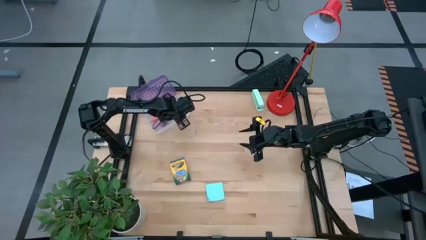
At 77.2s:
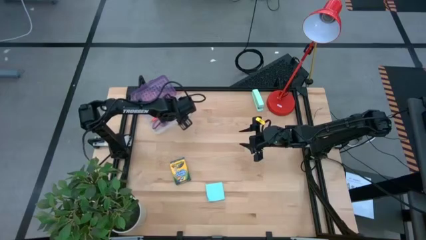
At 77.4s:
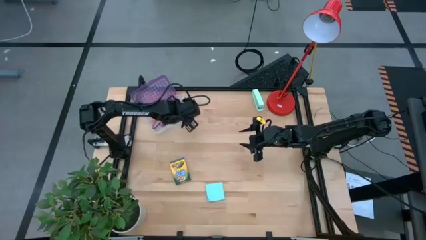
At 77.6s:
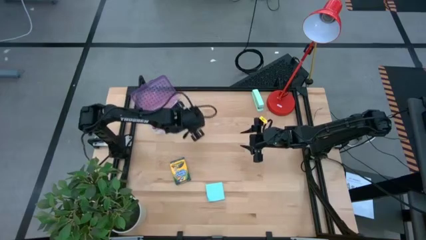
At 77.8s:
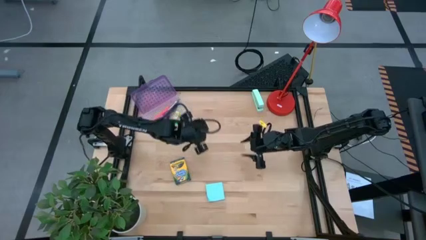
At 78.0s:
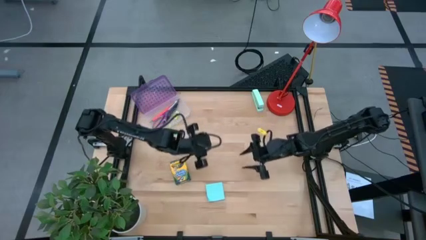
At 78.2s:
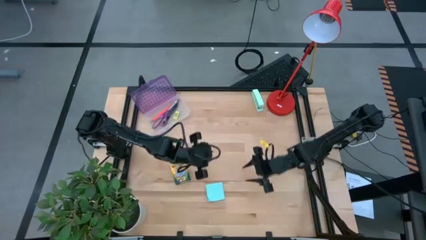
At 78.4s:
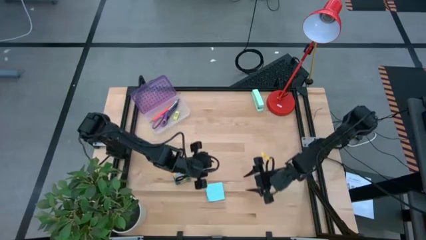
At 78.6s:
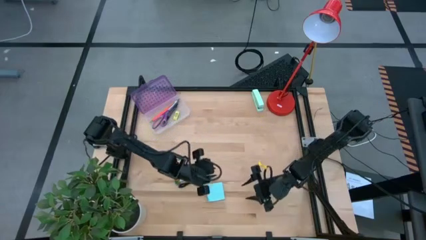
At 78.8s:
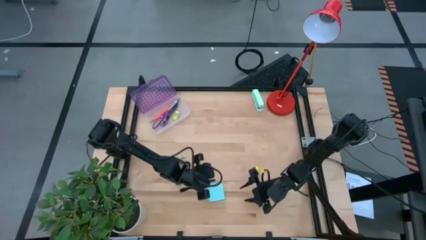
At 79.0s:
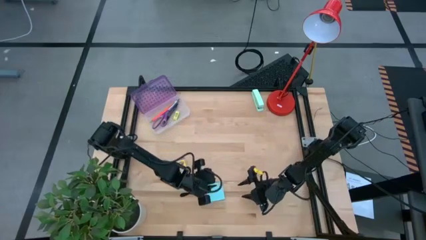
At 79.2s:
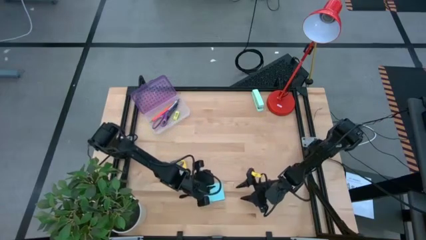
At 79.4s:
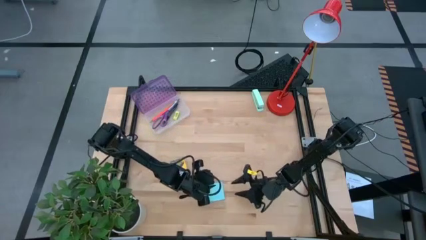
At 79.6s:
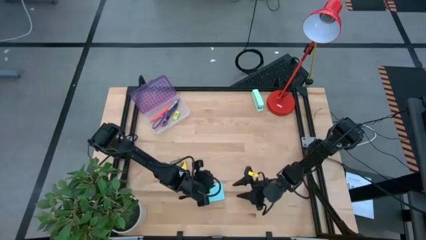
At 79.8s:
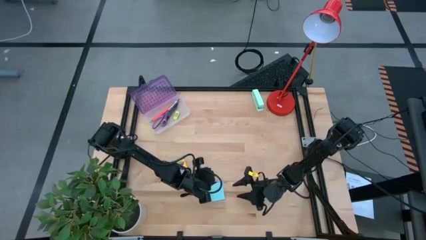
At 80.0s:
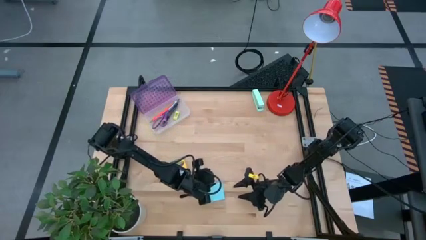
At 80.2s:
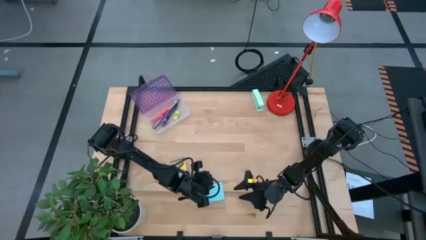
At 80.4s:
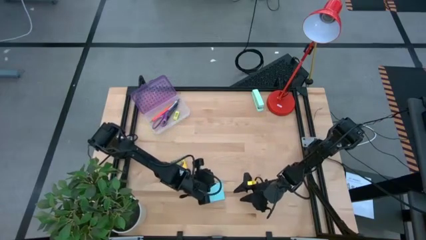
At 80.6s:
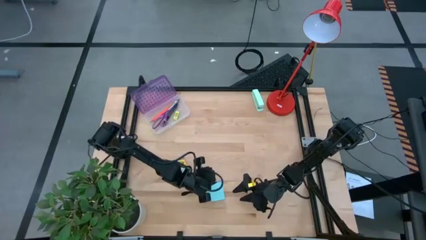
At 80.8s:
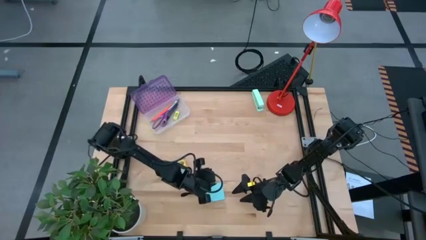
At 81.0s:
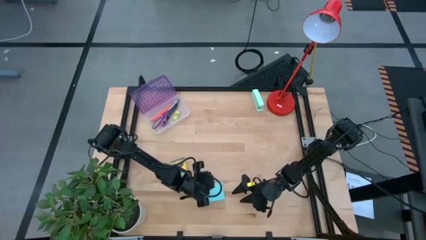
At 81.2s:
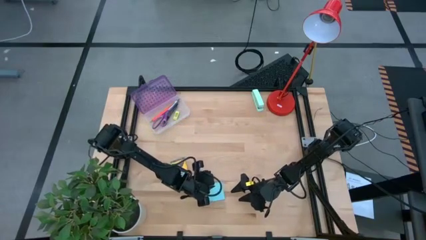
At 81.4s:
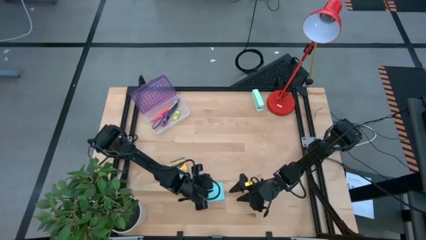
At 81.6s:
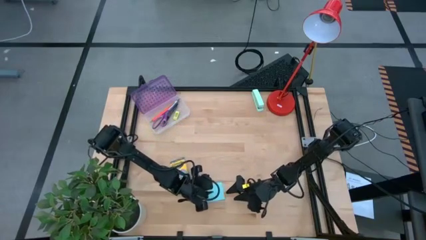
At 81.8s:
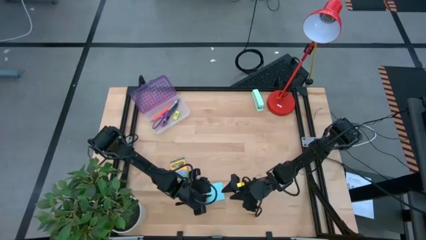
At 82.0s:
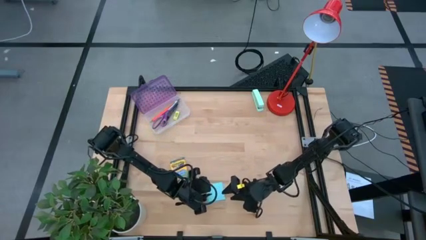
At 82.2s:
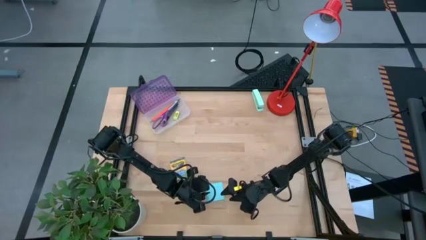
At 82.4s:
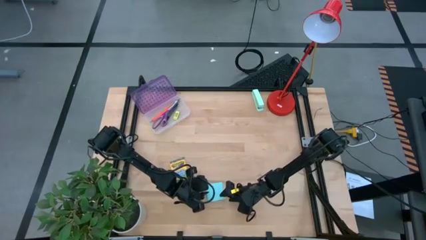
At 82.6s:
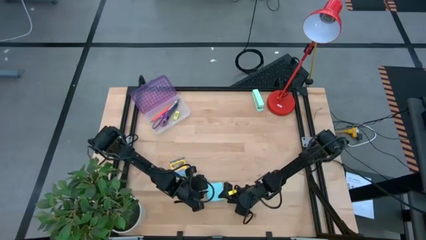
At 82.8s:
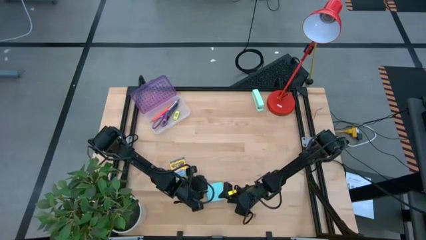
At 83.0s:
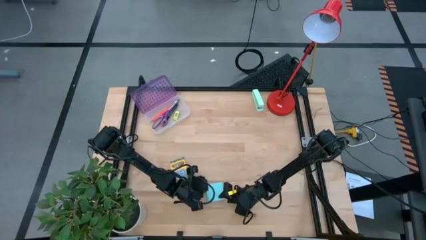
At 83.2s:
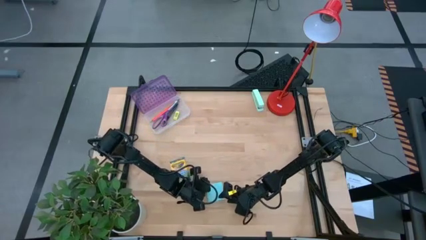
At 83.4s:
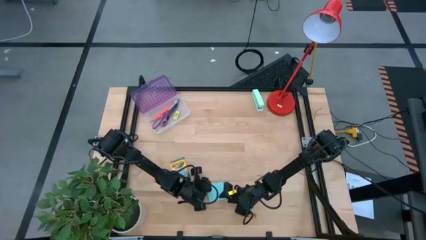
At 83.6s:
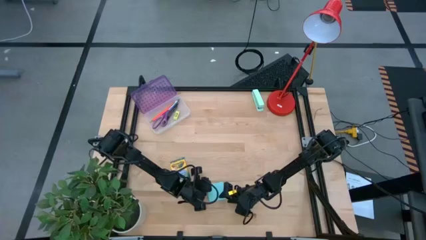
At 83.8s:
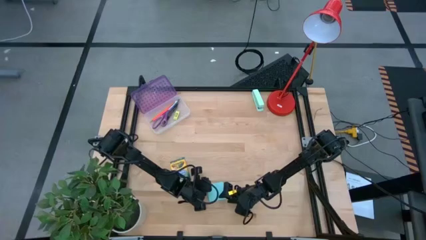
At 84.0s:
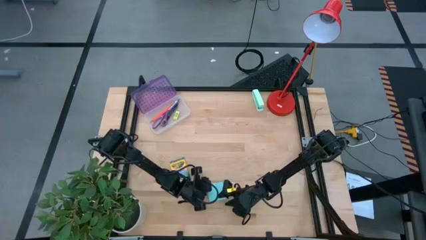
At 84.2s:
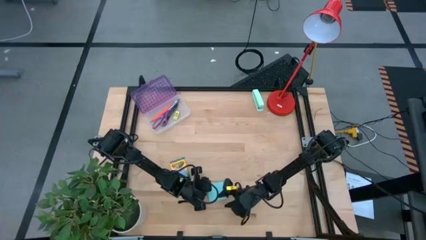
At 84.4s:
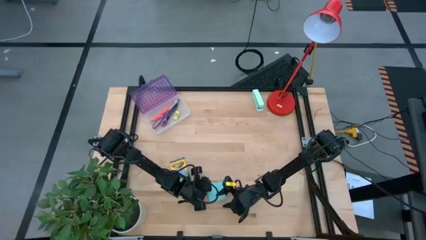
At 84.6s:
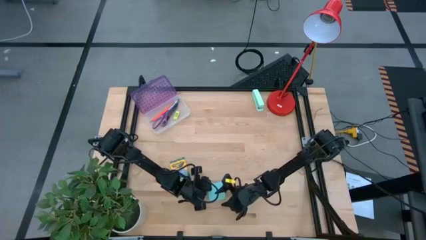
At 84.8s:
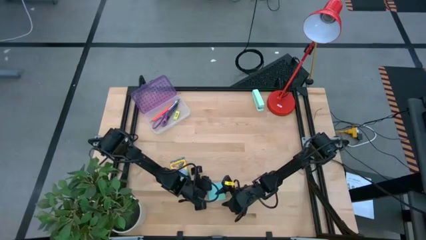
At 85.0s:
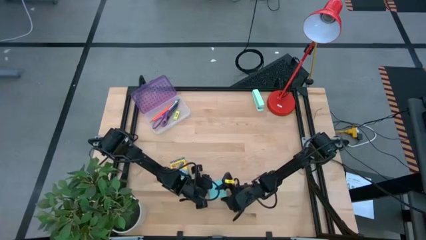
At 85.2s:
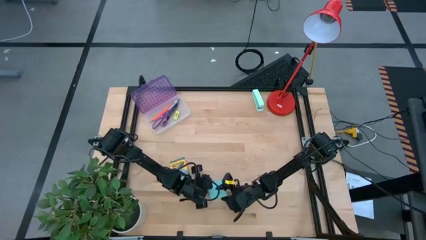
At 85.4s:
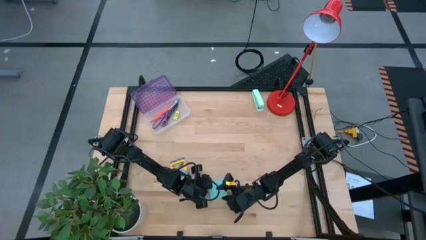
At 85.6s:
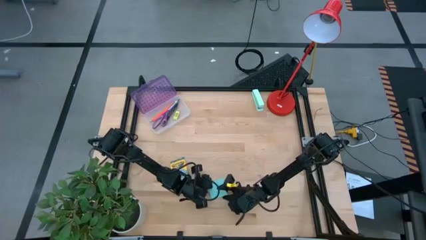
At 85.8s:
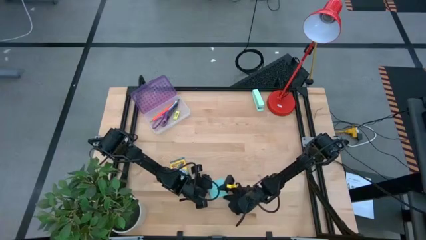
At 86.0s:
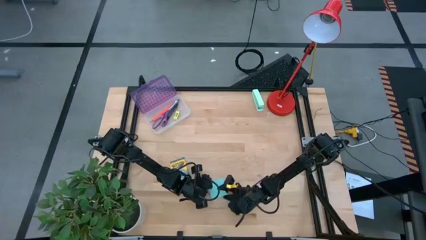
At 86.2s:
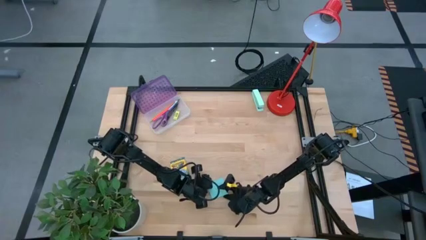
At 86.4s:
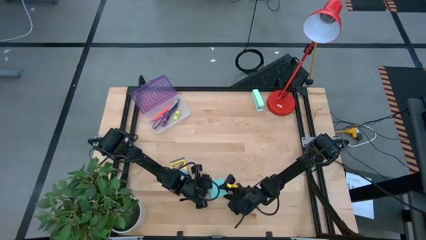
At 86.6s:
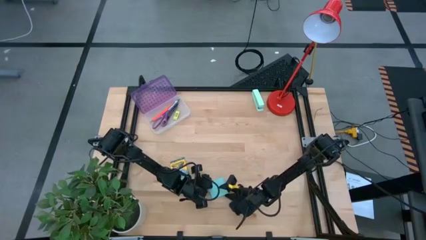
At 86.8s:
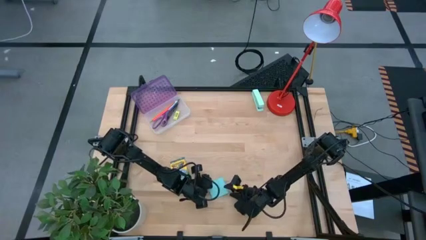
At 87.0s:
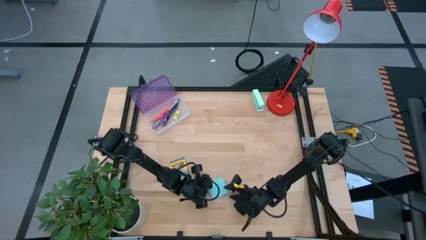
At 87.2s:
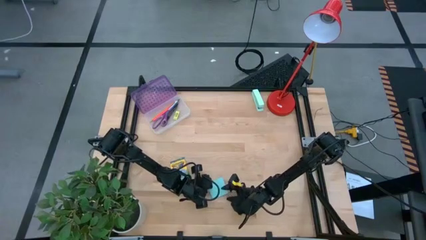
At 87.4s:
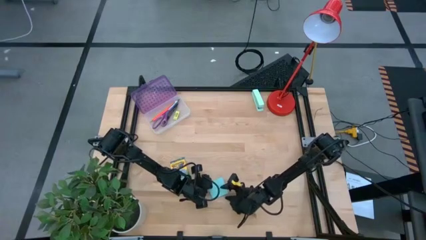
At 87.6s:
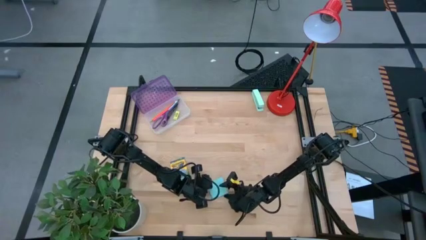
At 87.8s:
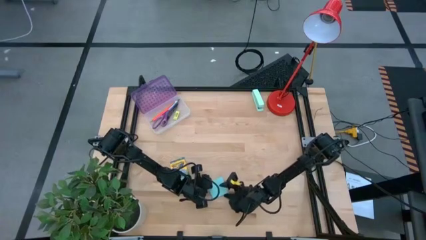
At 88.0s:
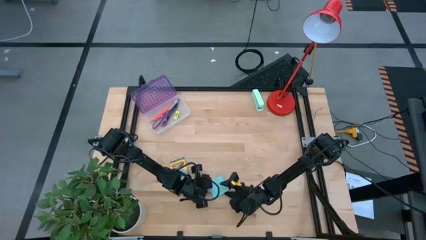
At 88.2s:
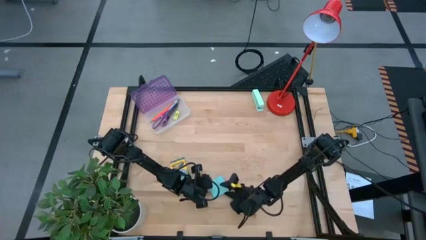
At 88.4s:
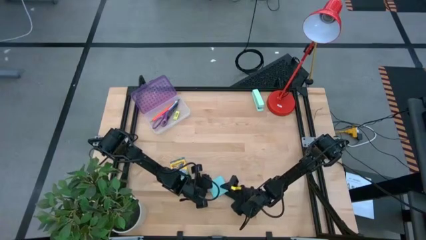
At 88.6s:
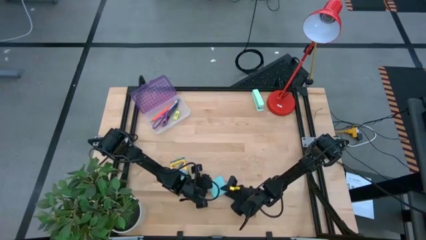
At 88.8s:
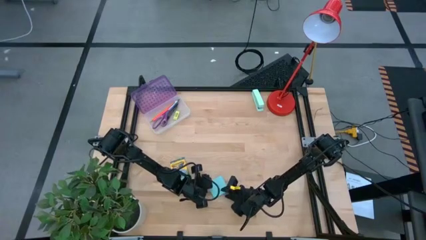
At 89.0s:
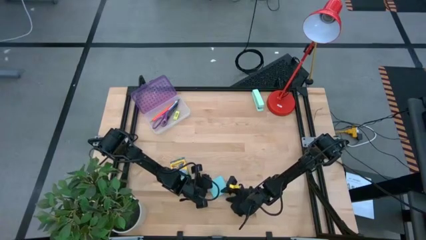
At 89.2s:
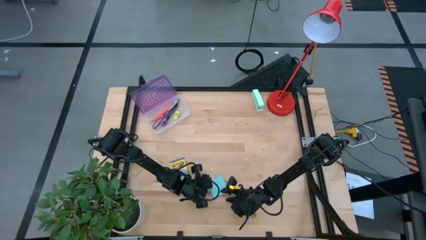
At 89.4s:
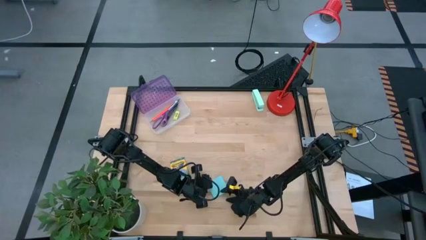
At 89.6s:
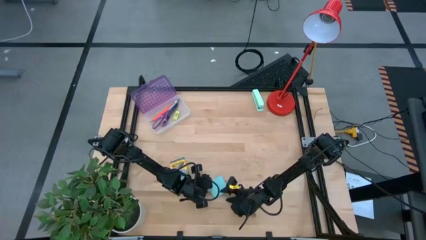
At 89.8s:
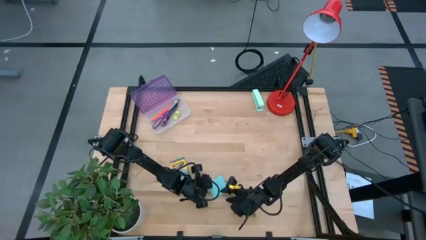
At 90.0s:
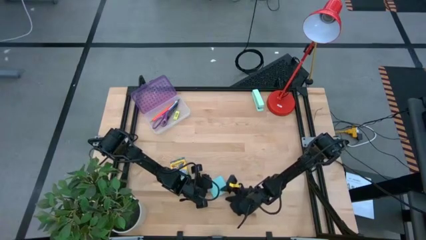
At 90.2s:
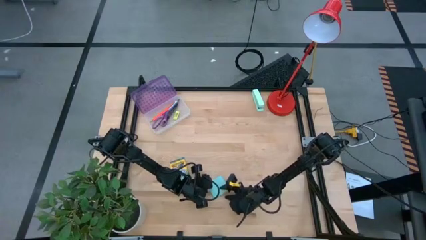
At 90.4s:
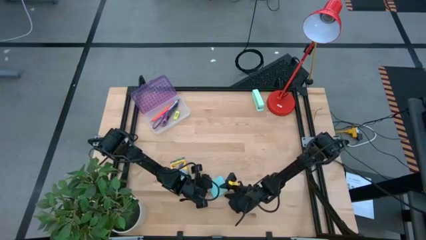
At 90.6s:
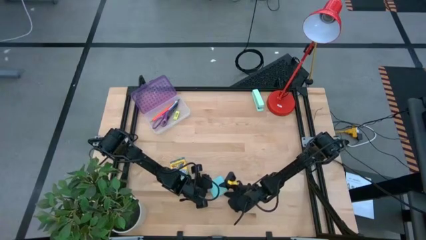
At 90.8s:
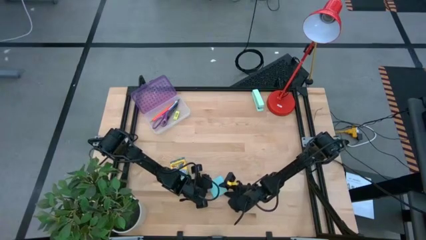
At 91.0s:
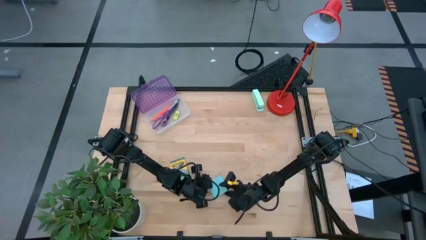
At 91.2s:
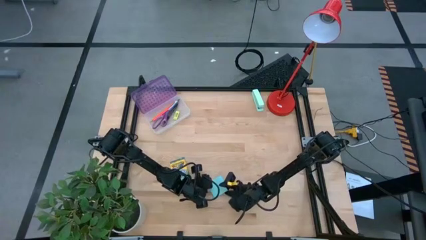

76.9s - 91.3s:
Task: Pack school essentials
Put the light blue sticky note into the purple supply box
